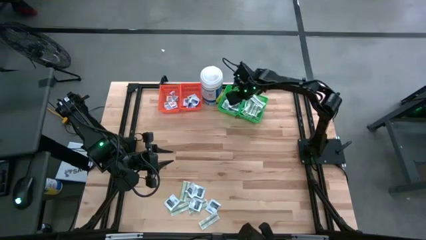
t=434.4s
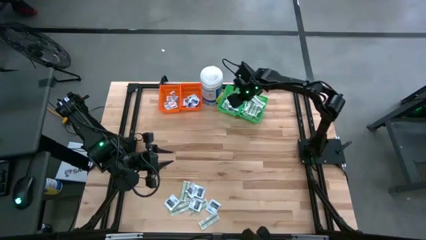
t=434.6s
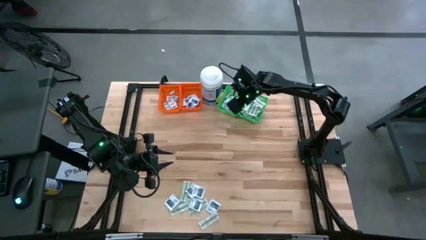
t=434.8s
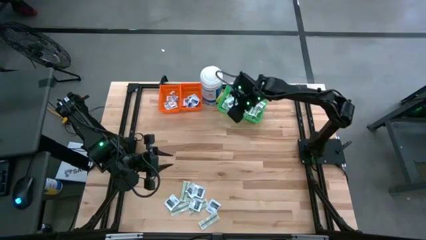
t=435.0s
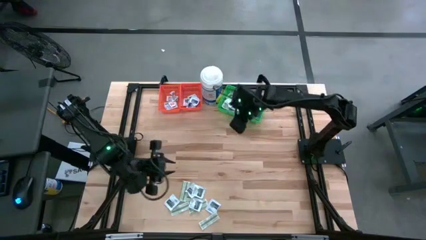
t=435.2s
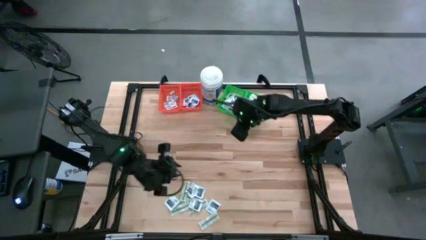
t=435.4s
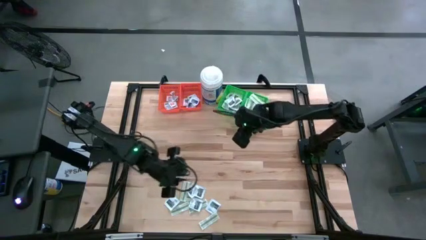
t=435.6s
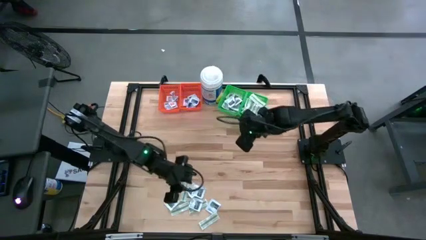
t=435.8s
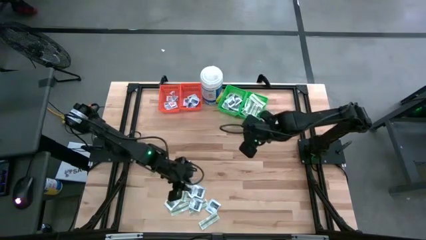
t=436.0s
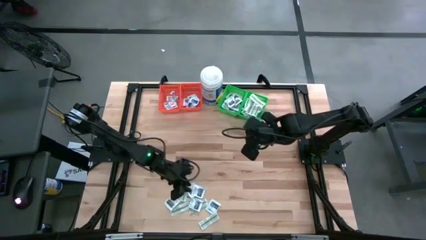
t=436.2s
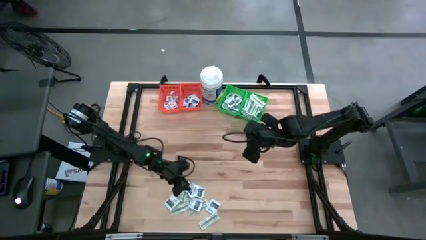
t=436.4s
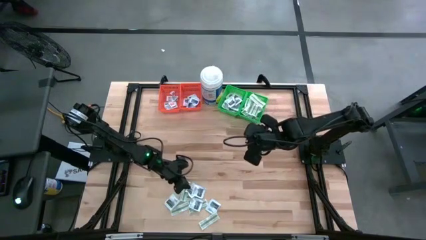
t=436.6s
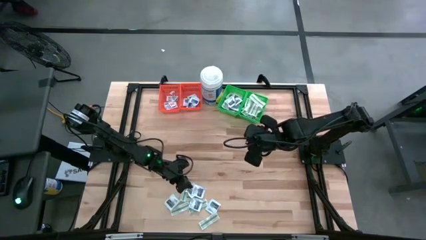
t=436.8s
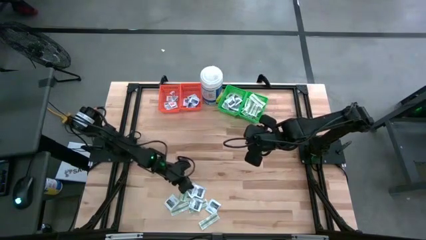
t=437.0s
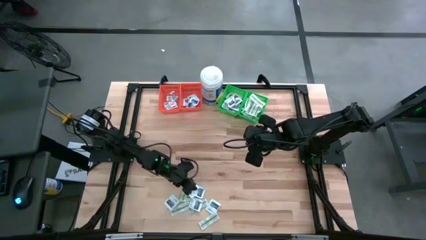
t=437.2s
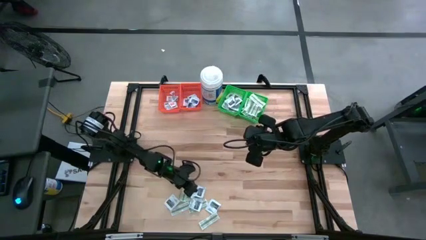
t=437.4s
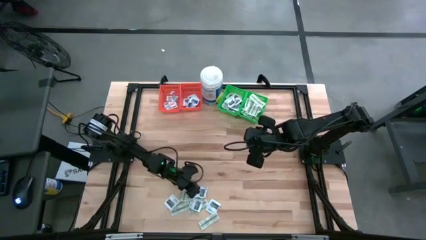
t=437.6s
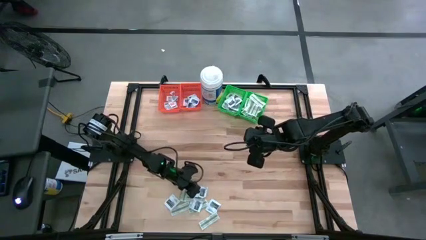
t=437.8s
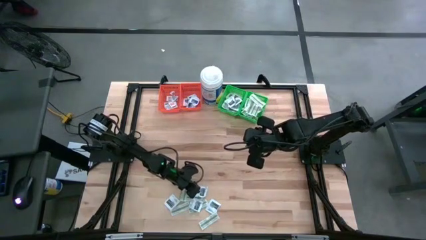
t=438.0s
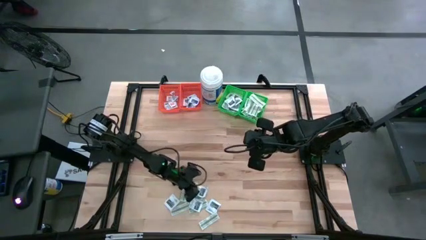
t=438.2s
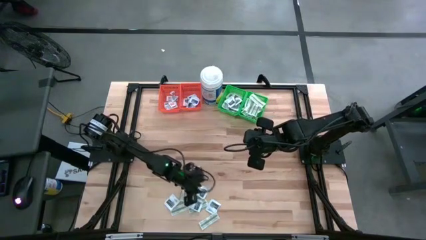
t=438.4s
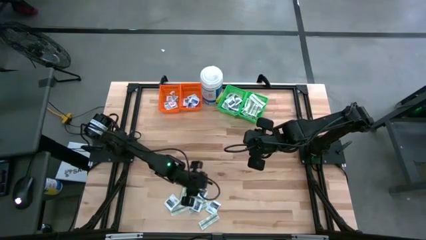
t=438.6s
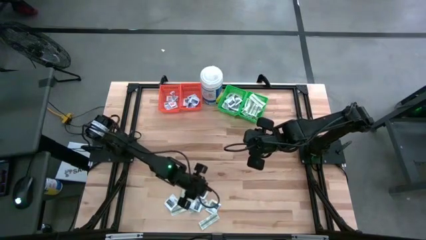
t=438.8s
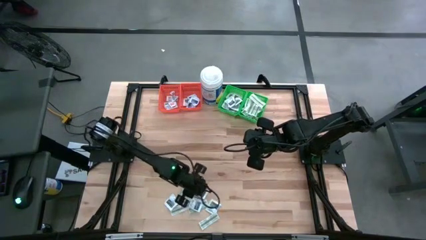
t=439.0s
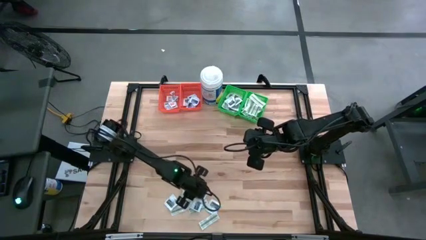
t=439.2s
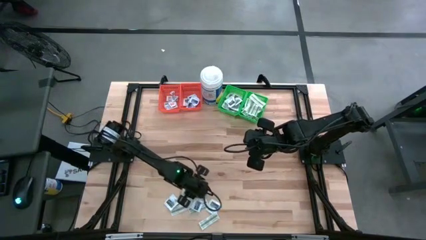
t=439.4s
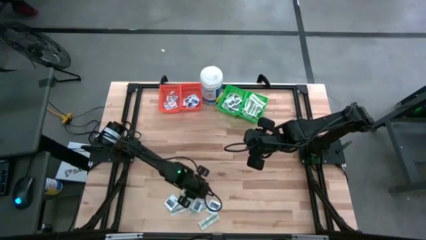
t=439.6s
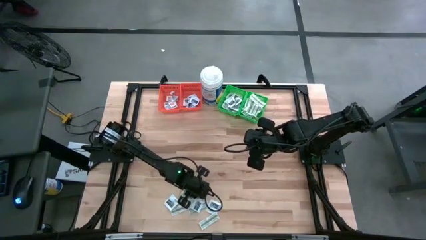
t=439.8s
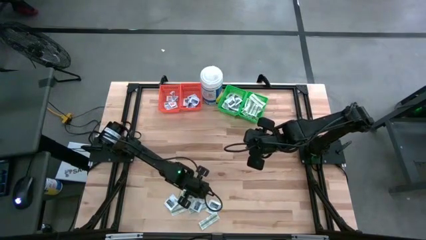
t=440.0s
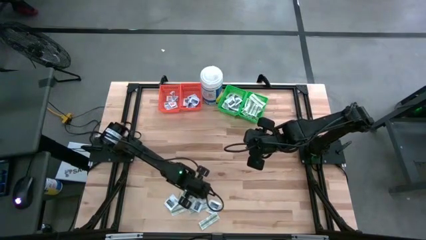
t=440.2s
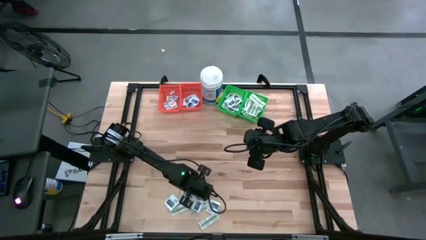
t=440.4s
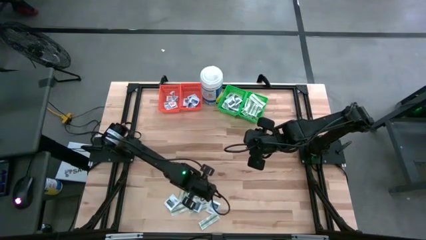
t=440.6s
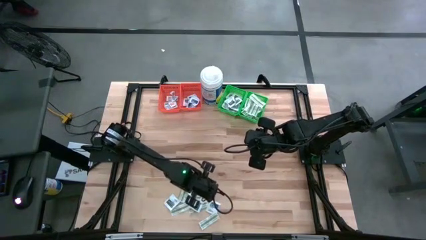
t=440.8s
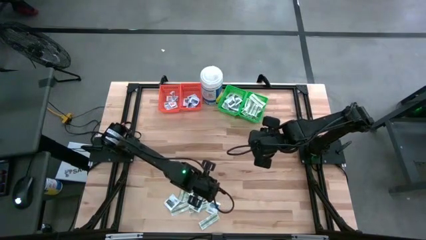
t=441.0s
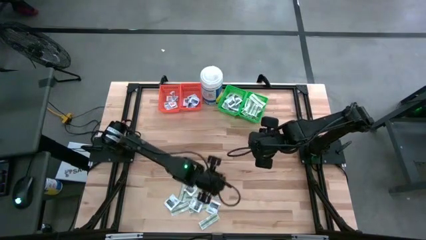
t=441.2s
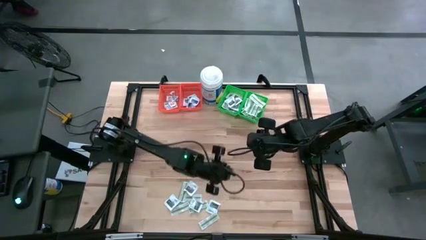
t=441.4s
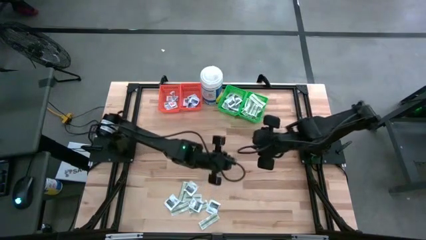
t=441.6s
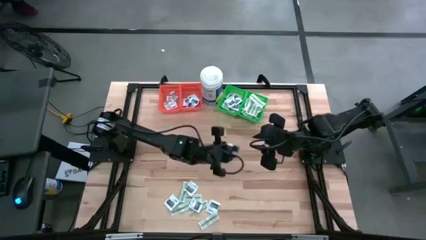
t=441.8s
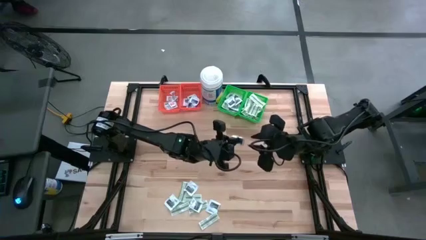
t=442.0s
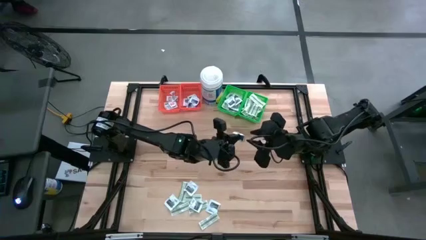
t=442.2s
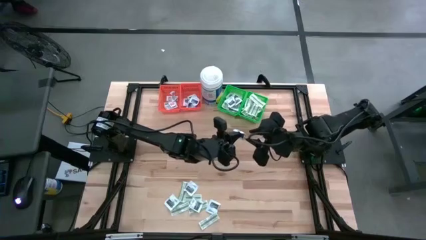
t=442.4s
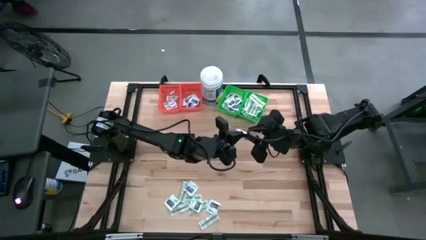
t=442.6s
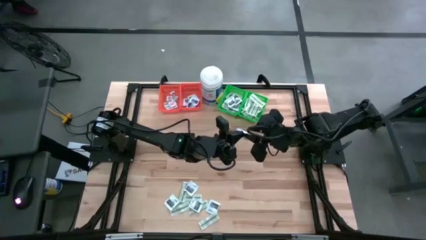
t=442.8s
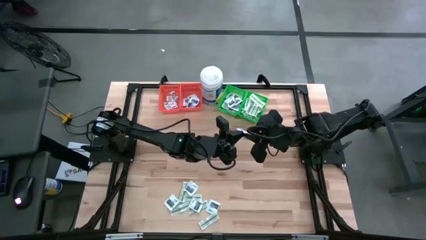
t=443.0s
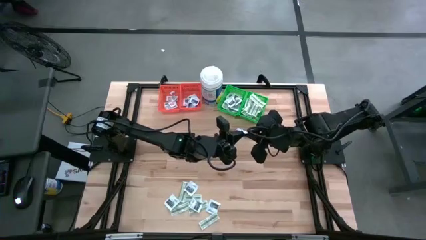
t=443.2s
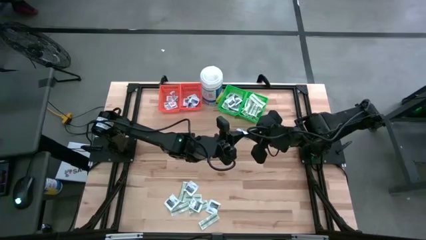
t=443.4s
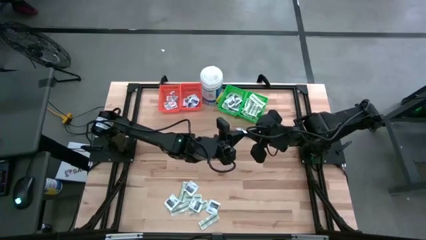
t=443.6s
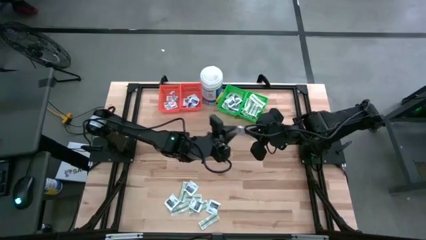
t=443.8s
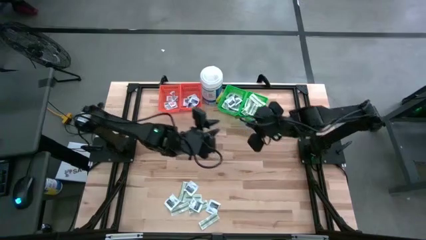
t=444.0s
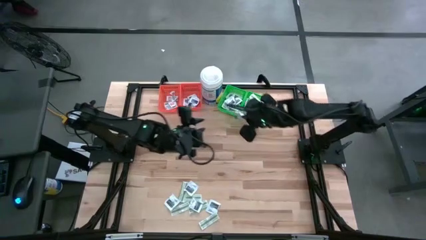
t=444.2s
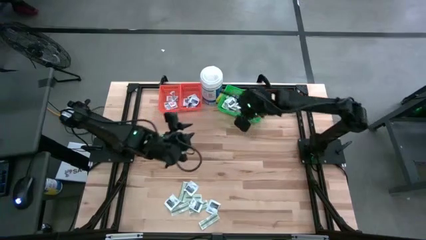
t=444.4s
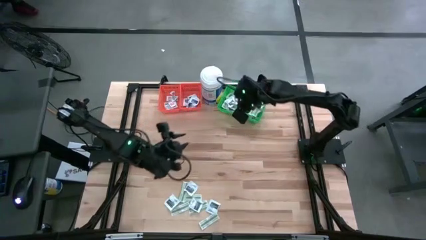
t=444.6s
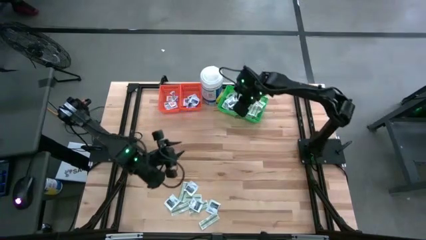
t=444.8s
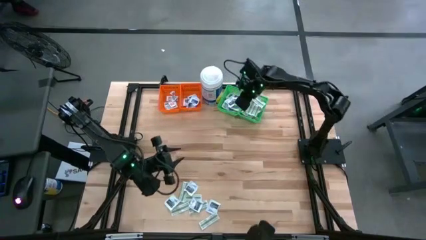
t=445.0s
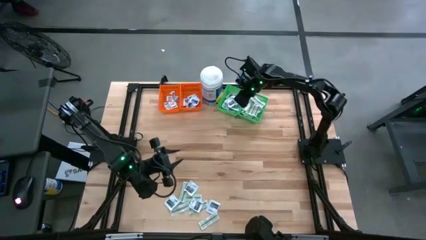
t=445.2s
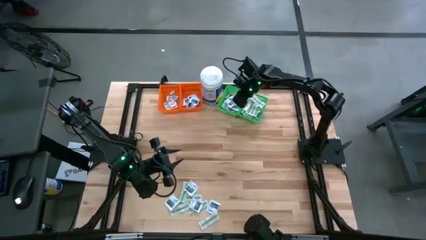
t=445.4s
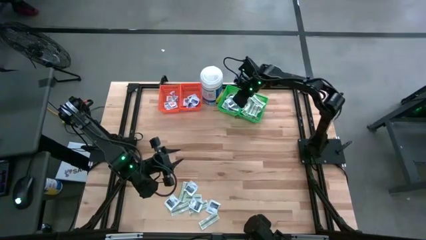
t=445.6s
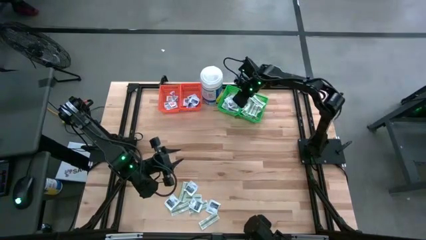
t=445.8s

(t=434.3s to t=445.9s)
Task: Pick & Place First Aid Supplies
Put the black towelette pack into the left green bin
